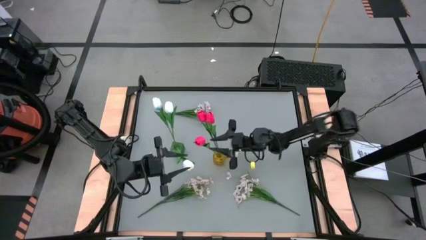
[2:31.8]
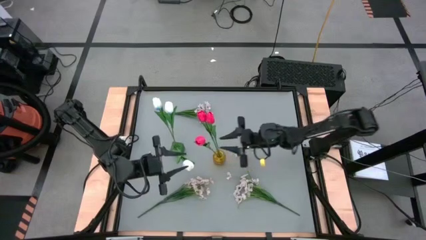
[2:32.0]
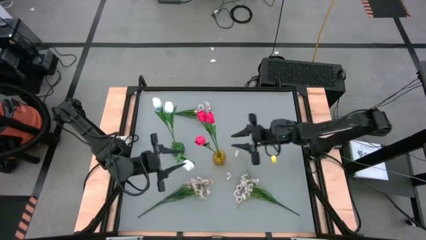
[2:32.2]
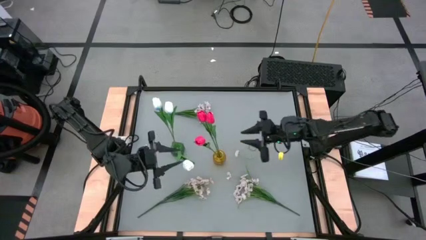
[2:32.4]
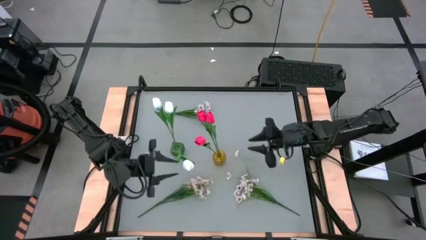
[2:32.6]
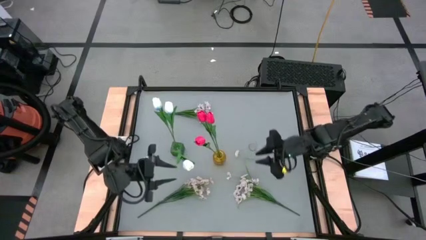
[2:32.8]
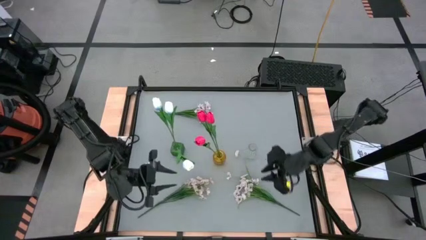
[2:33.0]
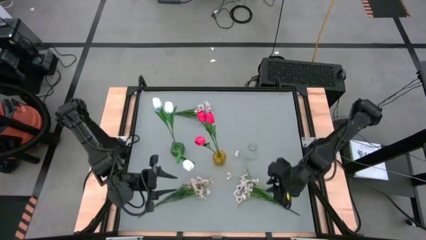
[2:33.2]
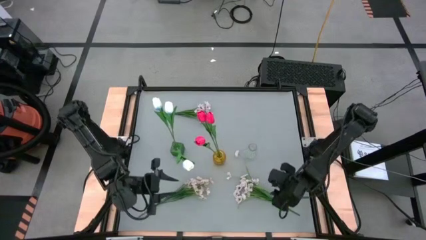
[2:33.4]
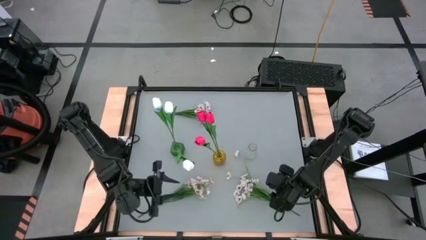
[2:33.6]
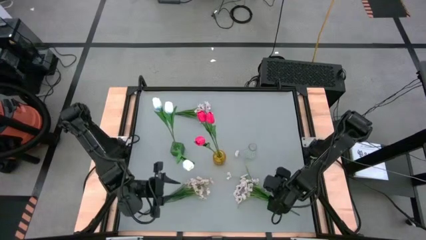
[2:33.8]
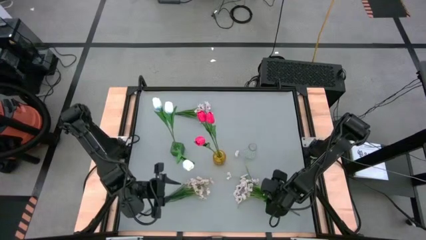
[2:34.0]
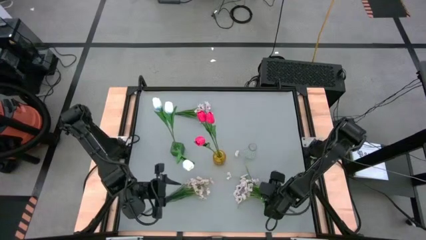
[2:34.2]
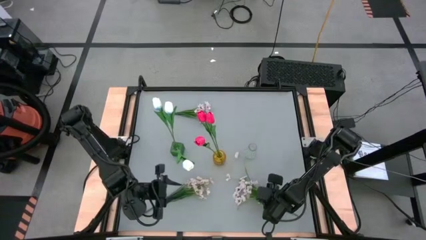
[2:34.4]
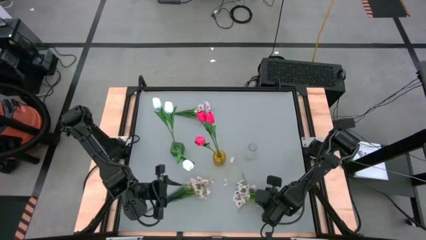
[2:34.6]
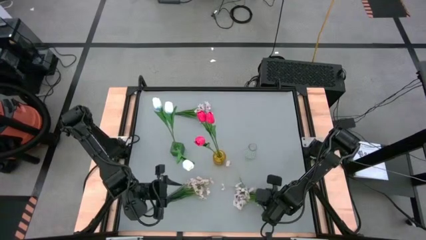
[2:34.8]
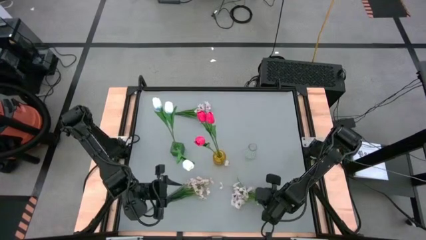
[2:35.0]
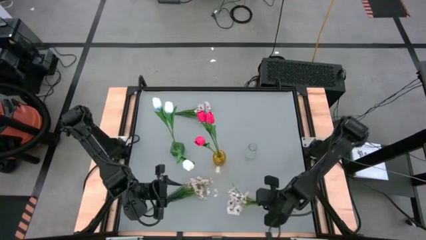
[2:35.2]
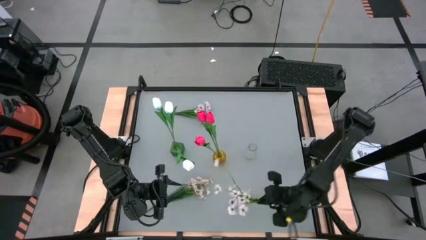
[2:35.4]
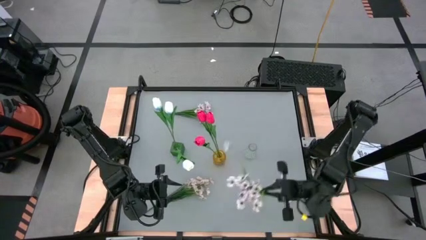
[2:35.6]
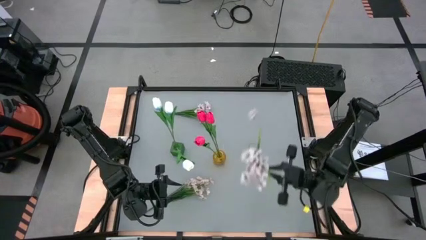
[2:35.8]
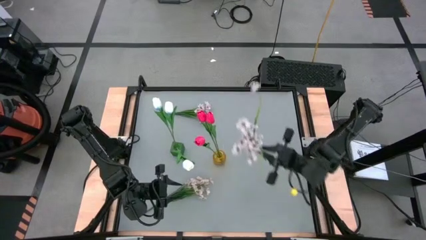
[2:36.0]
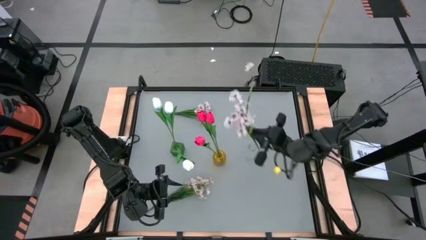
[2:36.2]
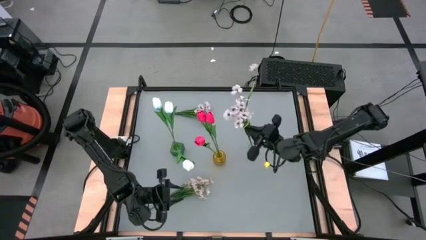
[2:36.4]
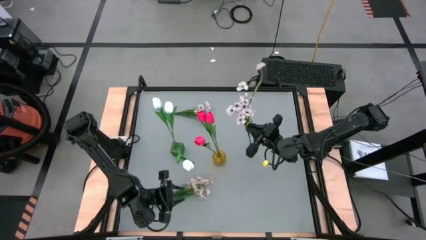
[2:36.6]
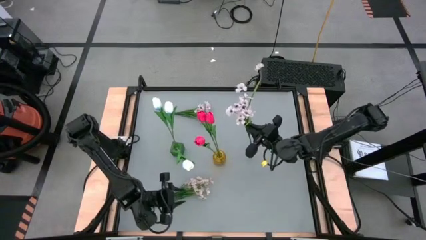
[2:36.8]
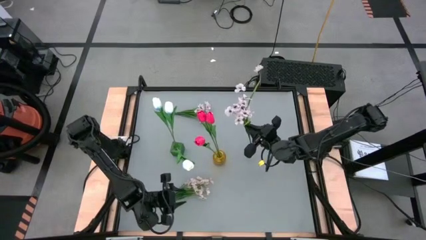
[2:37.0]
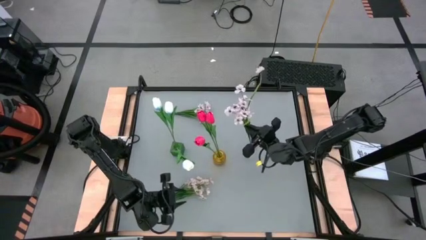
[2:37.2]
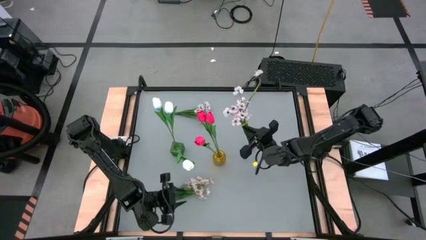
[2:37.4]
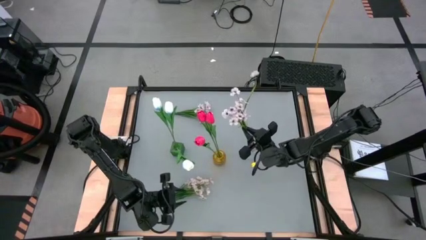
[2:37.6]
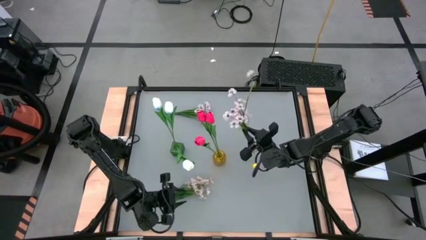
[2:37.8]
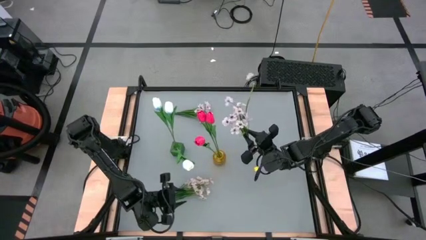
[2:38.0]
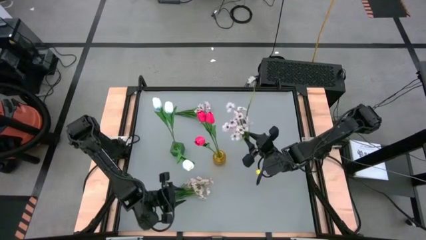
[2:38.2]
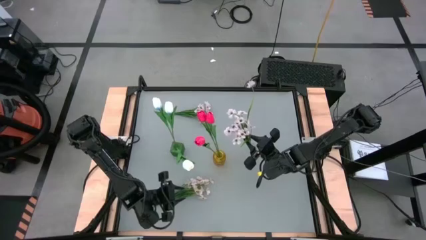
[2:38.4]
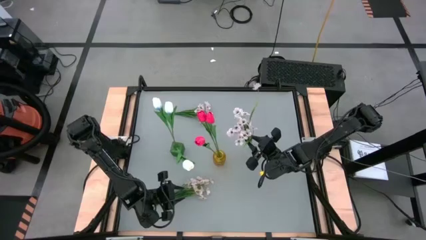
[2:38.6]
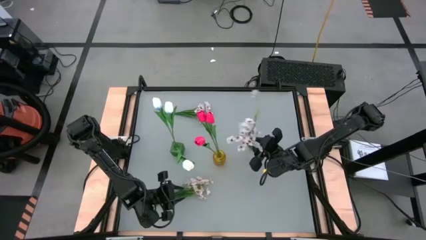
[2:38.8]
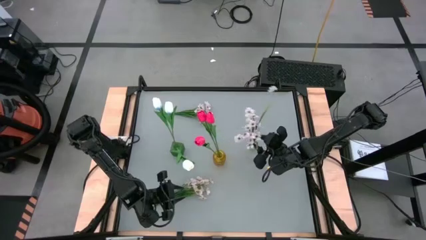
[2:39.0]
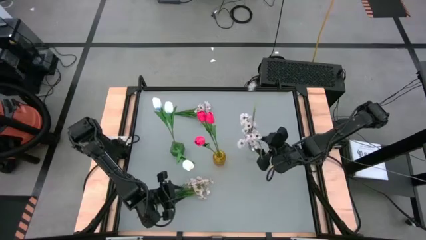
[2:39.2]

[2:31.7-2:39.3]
Task: Sort flowers into vase by color
Put the bottom right white flowers into the transparent flower vase

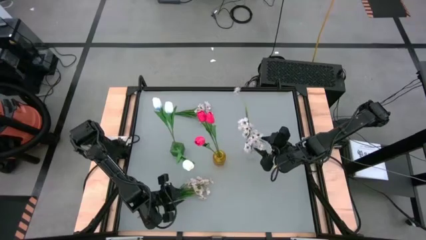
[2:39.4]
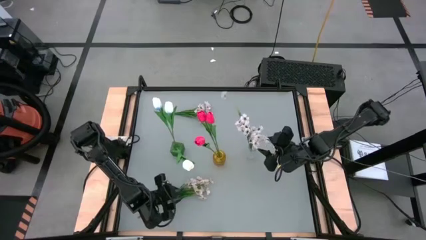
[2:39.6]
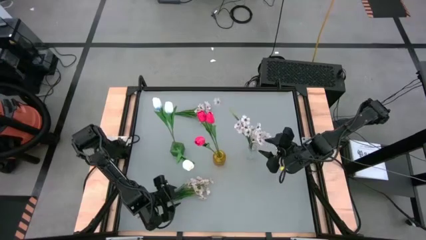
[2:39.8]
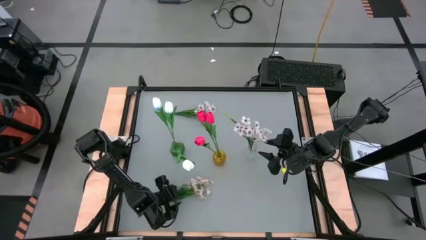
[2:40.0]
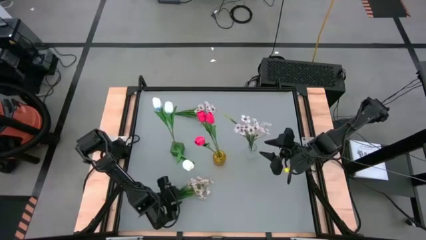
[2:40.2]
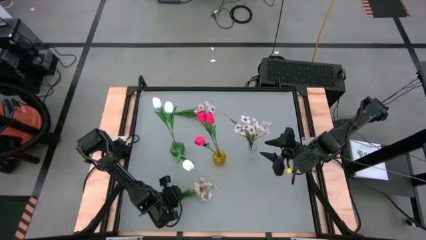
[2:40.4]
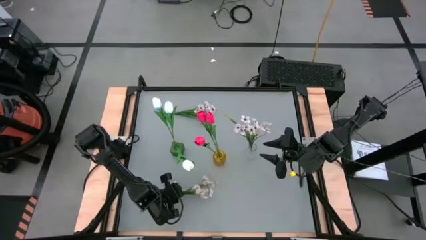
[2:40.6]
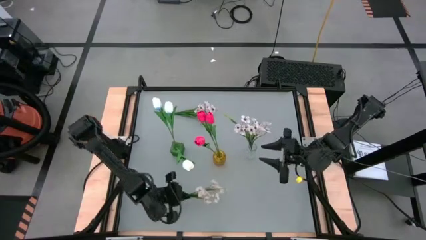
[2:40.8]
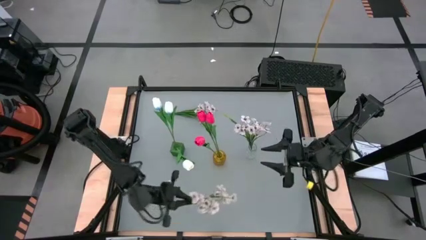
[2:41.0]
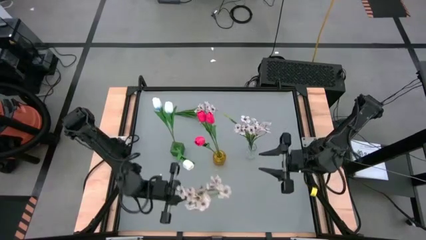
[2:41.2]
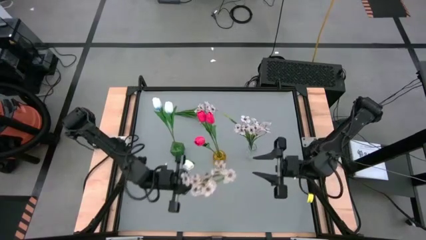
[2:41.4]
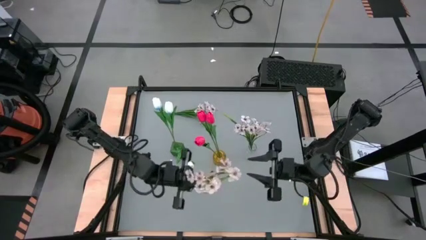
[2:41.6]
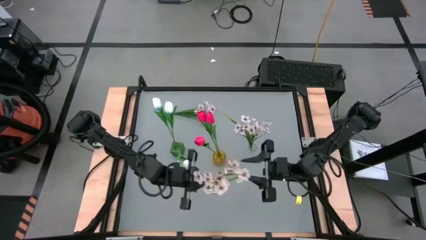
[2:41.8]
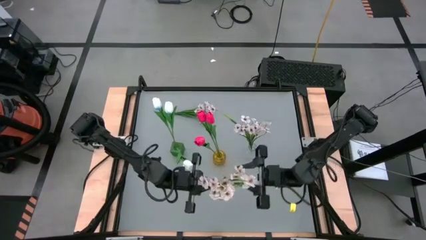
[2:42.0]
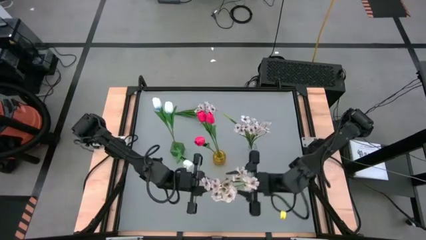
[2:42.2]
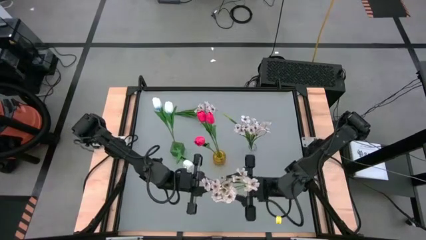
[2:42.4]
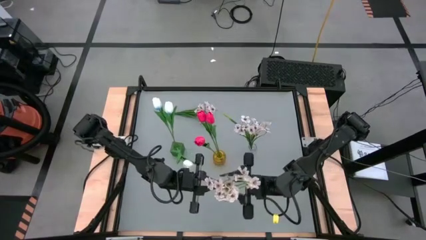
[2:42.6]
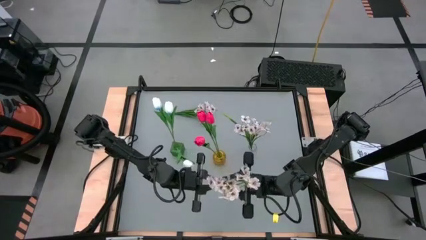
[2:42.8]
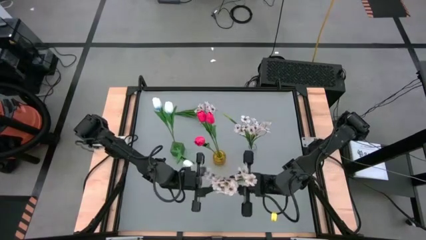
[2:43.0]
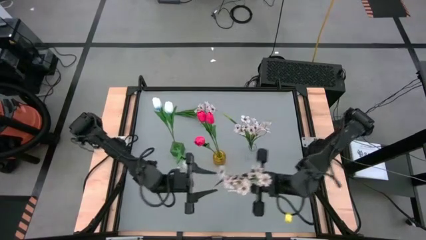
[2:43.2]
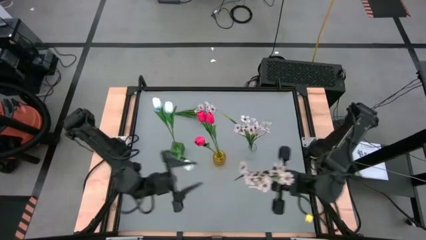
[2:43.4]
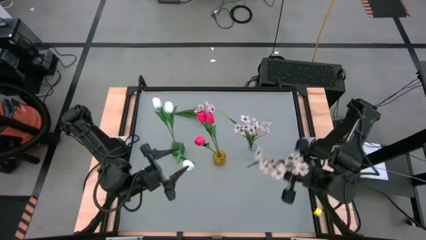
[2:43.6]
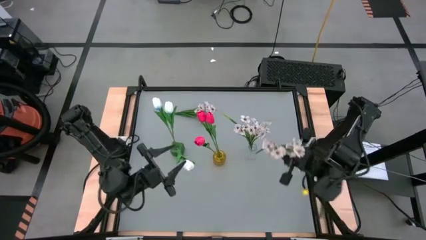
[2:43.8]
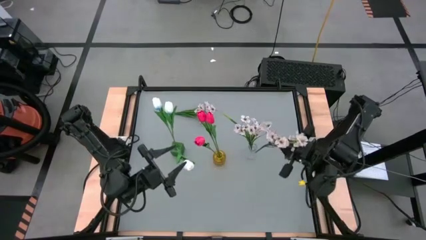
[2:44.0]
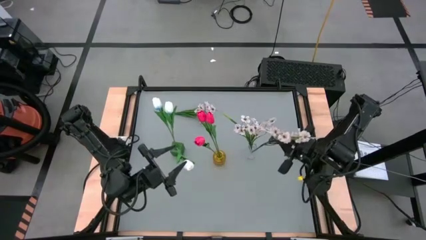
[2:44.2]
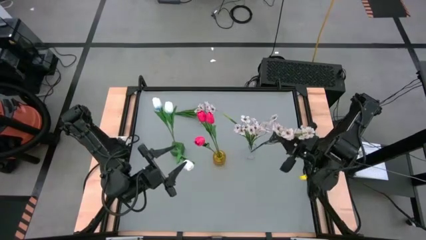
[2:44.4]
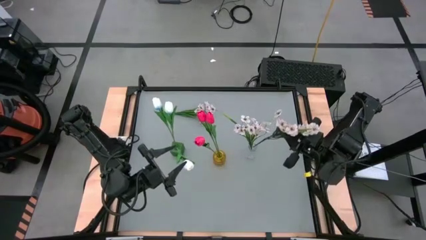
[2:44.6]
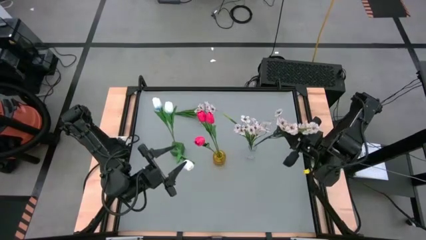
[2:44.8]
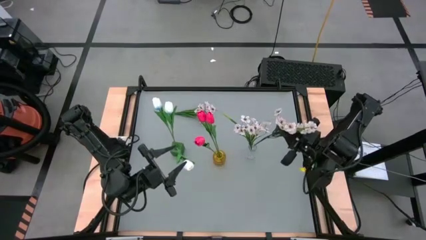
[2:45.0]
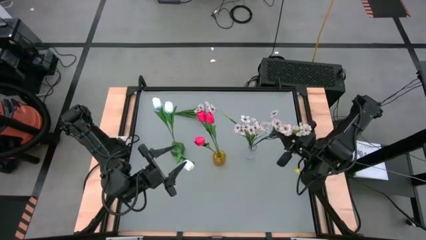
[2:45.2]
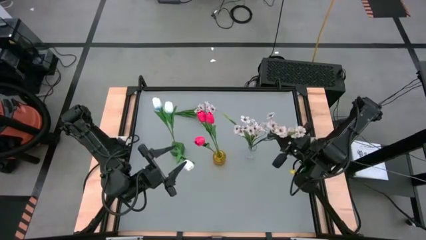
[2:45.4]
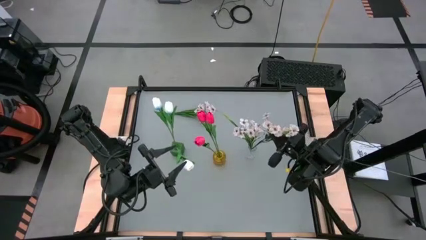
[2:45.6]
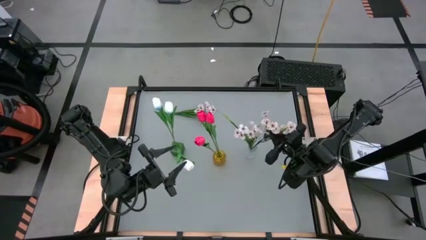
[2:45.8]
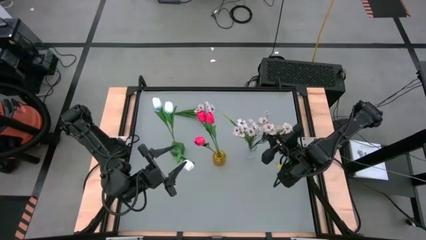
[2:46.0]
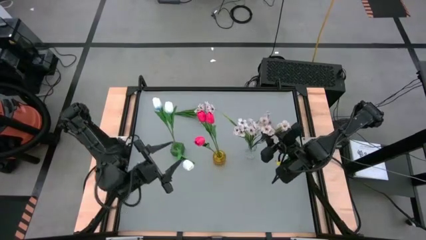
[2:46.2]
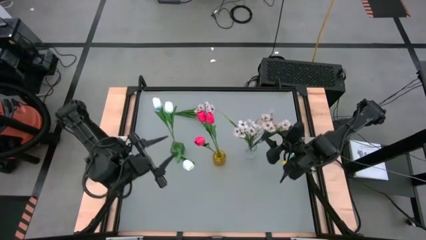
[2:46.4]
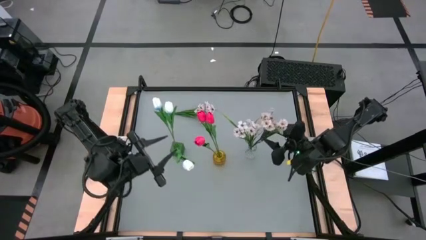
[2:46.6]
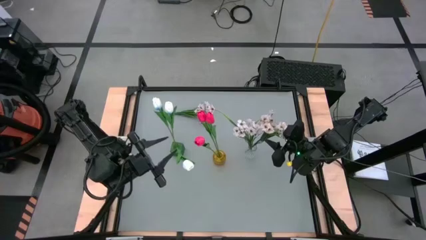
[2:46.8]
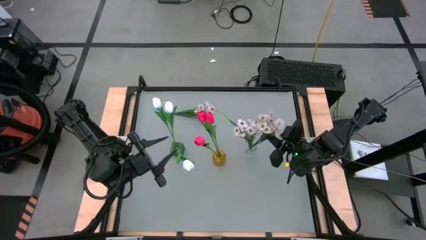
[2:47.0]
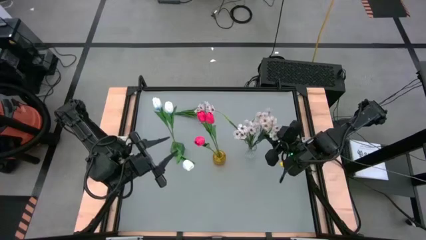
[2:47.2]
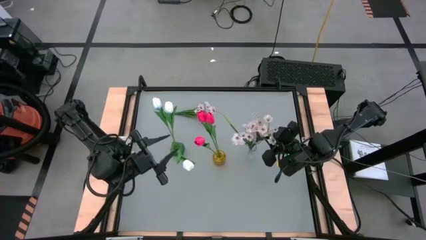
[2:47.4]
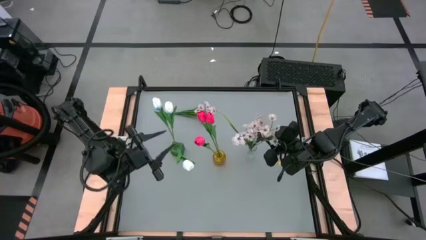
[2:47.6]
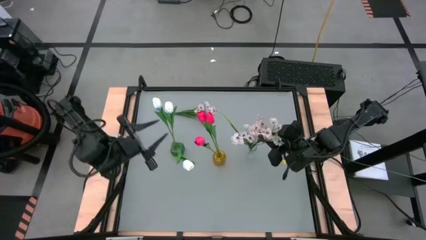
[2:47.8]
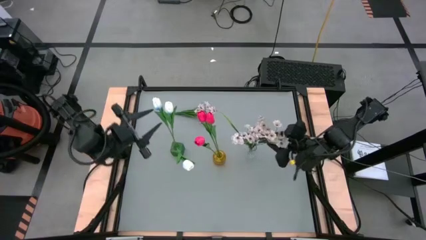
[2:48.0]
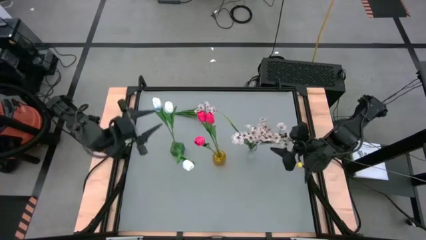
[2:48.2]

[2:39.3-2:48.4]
Put the bottom white flowers into the transparent flower vase

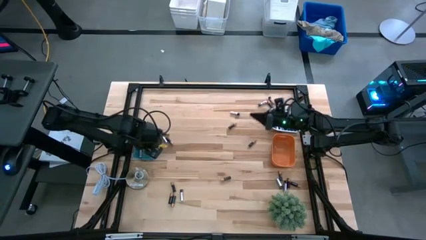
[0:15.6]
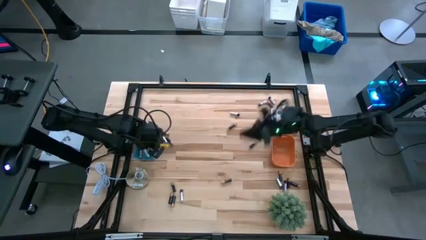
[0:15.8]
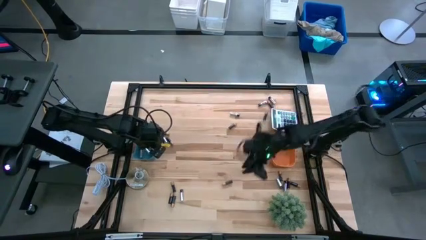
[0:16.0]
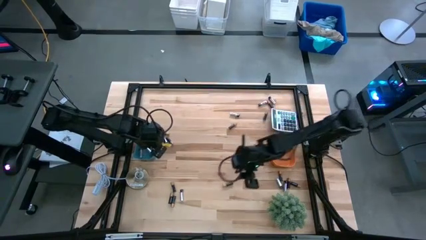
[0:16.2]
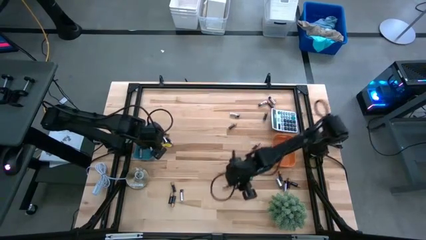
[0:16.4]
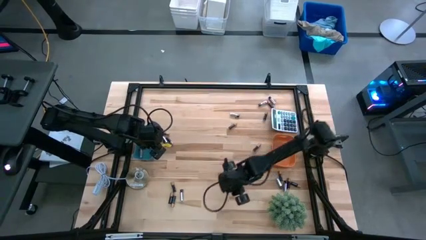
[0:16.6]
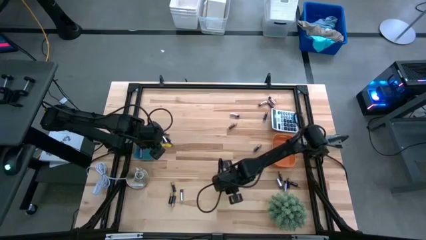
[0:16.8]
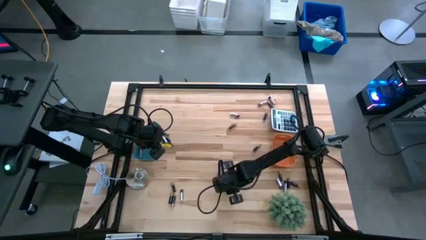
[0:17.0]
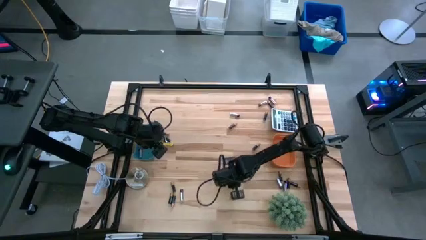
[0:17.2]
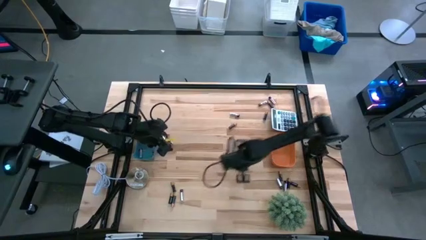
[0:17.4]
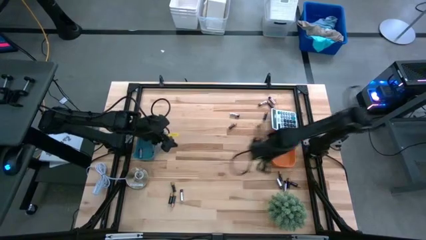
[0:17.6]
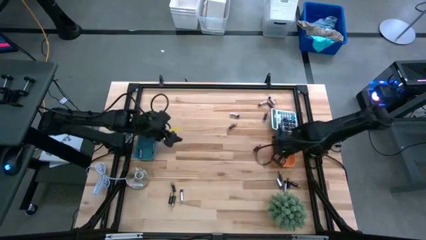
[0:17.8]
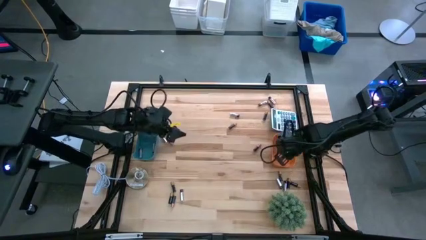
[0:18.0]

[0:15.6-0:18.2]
Task: Sort batteries
Put the black battery into the orange bin
